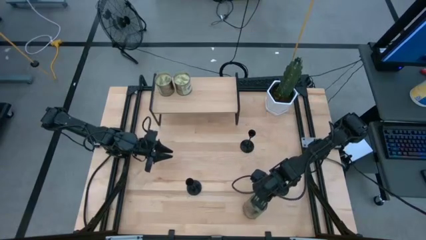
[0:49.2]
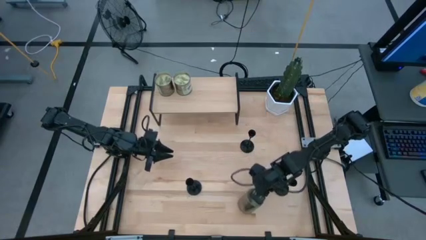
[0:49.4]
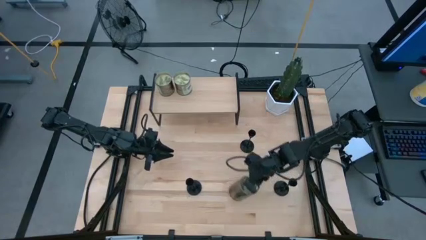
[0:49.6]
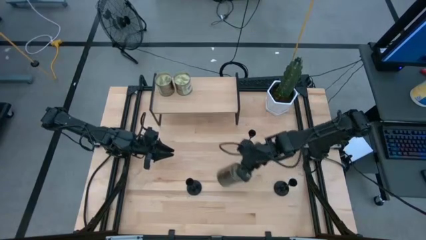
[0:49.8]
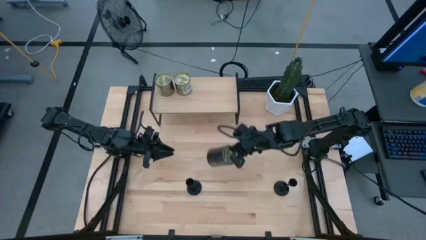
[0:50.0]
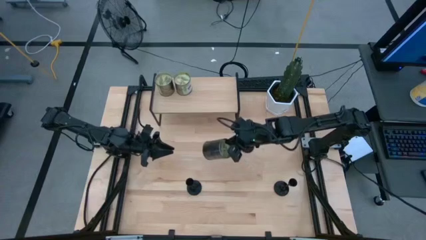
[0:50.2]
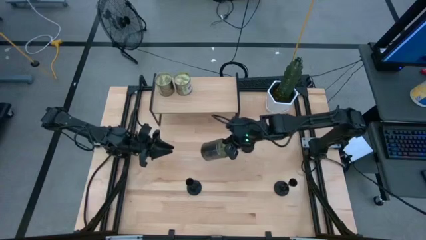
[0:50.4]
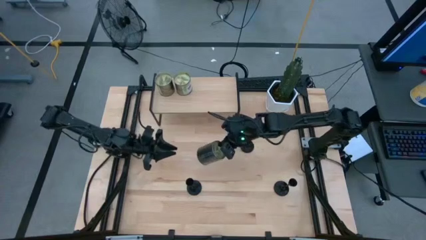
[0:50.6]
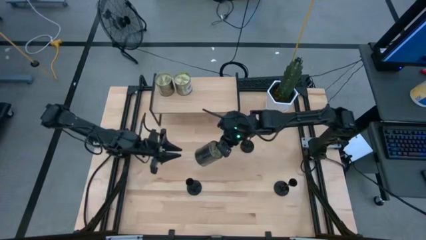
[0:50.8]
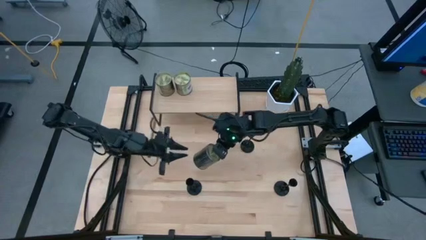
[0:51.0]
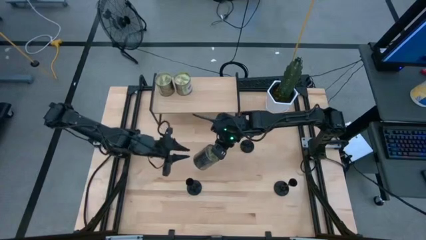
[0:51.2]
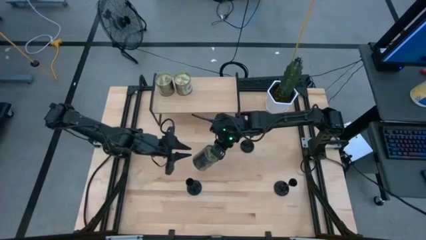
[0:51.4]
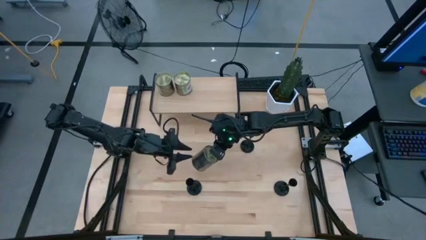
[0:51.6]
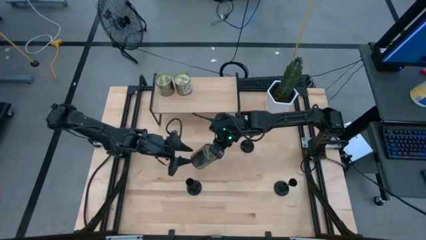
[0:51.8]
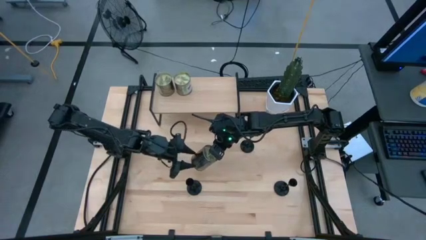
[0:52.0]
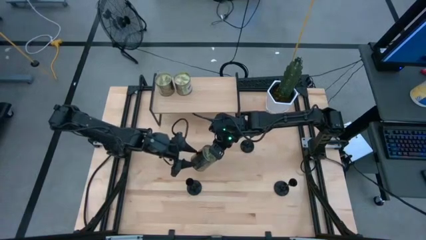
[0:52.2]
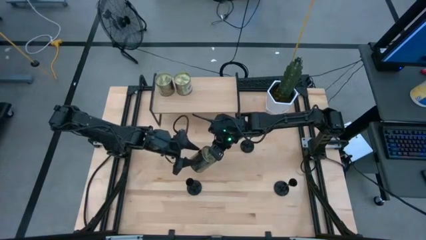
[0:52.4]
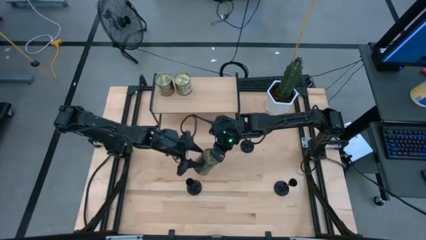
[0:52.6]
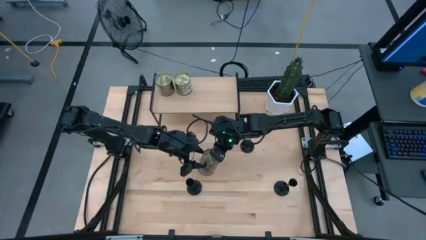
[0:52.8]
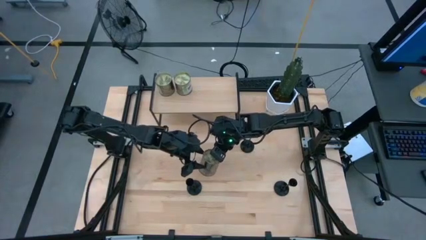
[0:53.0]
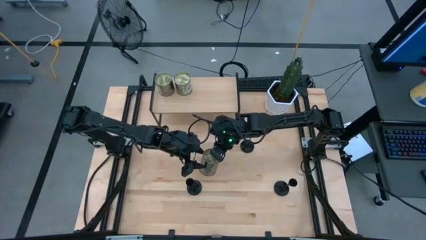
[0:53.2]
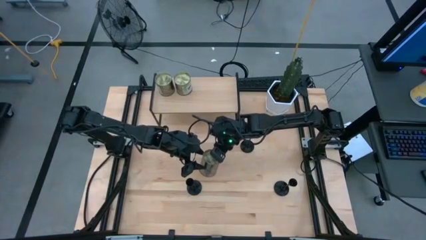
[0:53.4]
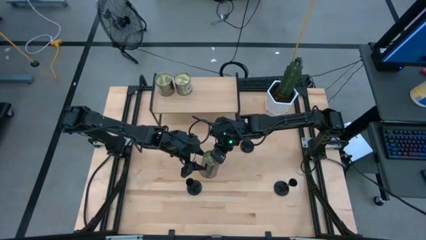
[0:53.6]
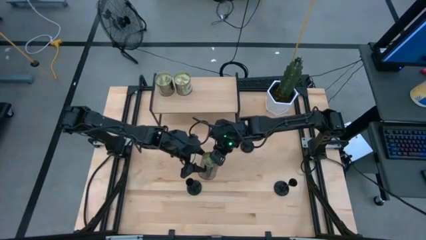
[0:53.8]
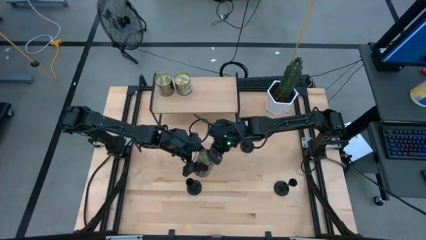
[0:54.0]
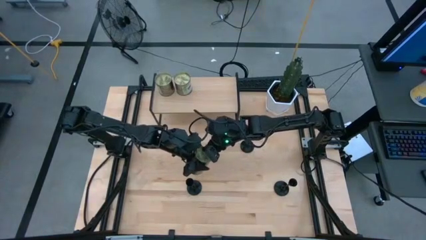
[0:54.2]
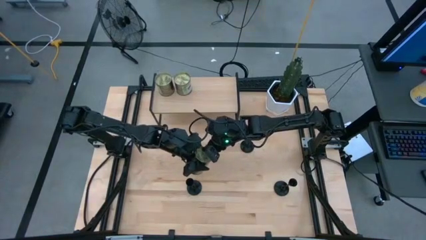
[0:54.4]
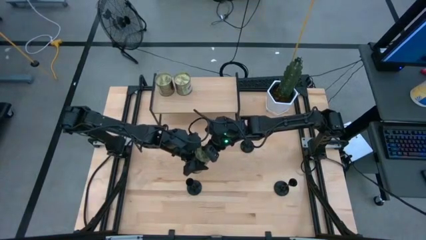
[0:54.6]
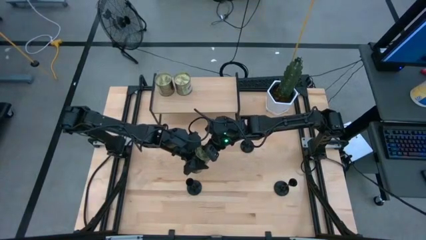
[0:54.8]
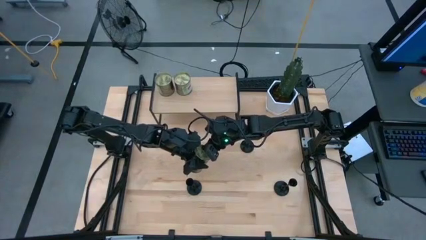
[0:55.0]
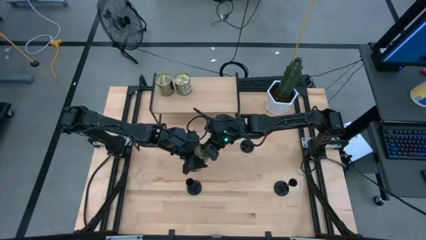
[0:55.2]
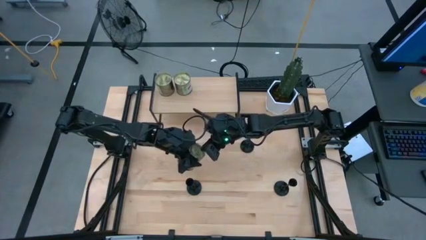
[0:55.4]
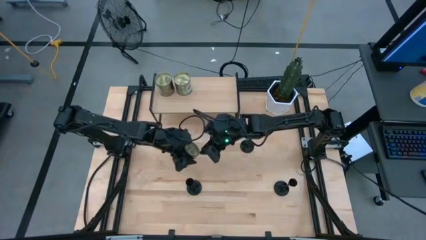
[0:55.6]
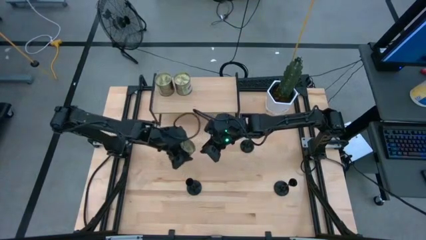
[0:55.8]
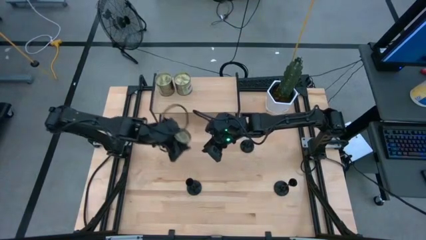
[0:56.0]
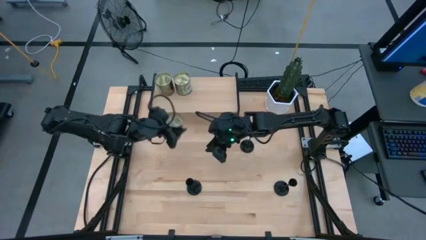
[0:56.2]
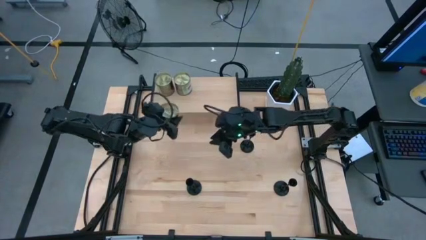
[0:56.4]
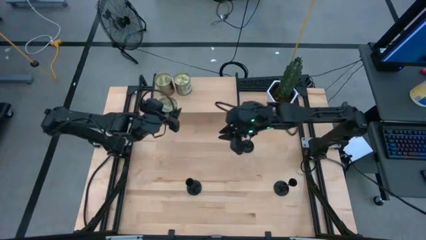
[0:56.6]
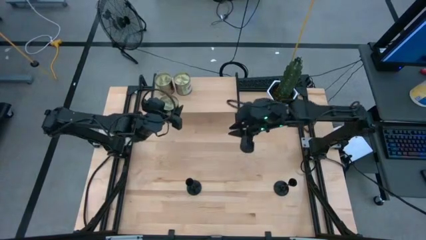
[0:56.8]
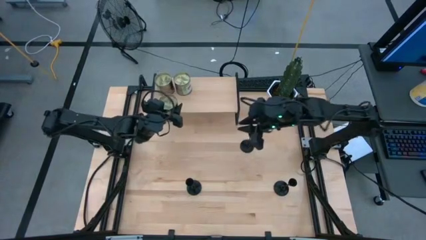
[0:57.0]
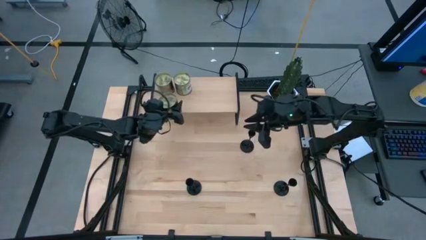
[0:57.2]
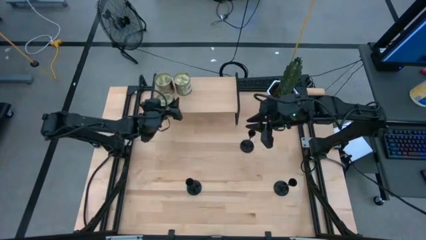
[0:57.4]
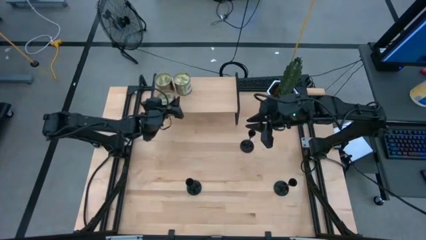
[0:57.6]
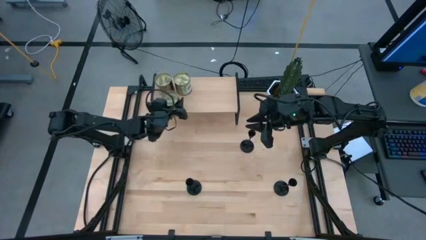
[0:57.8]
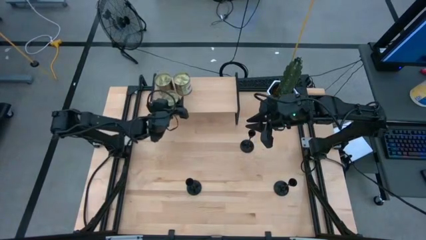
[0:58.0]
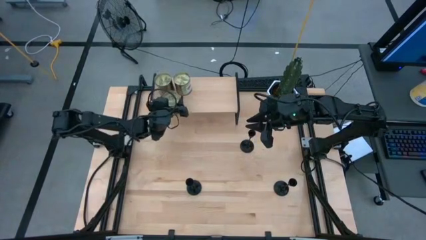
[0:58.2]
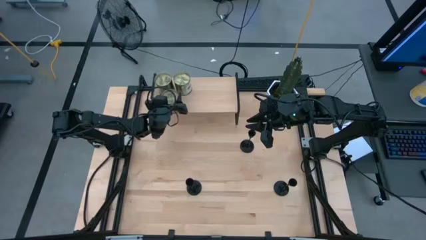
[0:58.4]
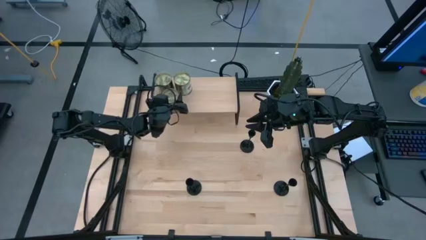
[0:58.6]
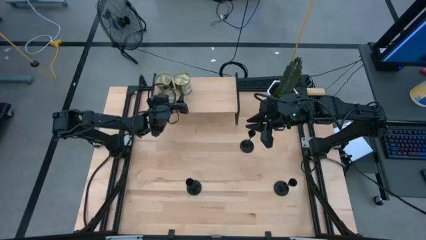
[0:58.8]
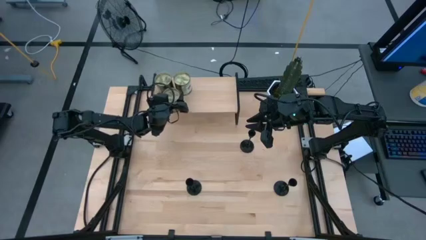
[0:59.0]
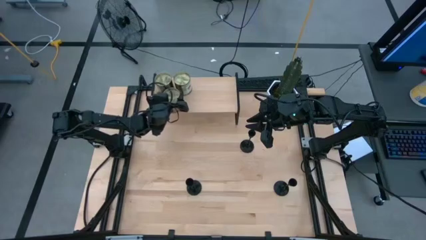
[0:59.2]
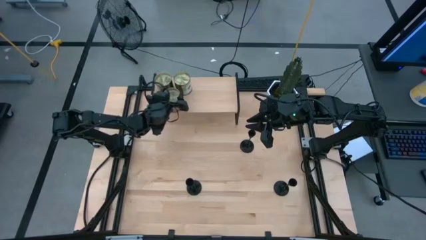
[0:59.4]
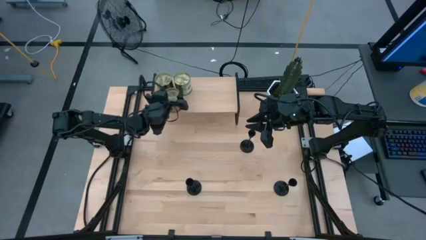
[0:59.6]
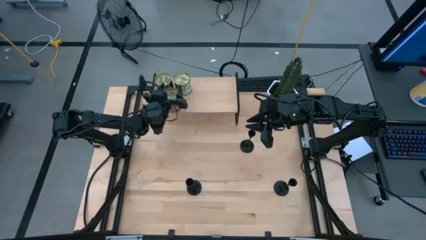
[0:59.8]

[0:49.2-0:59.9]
Task: Pick & Place candle stick holders
Put the green scented candle on the shelf

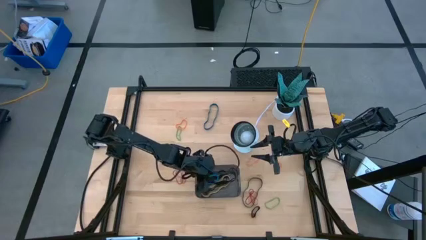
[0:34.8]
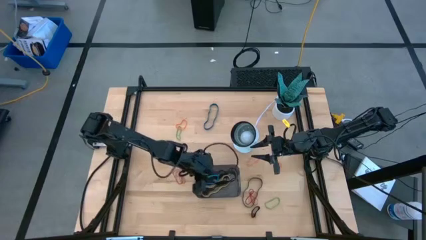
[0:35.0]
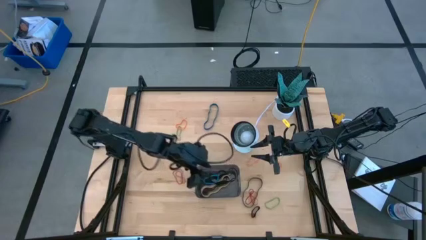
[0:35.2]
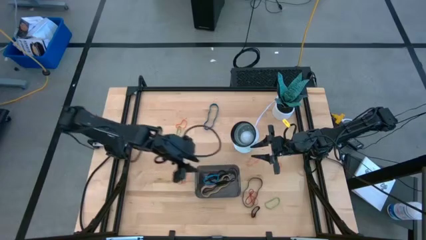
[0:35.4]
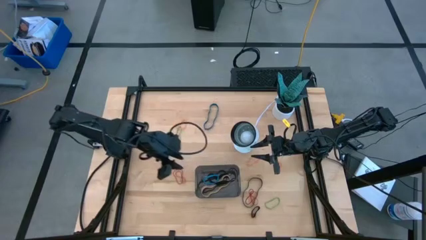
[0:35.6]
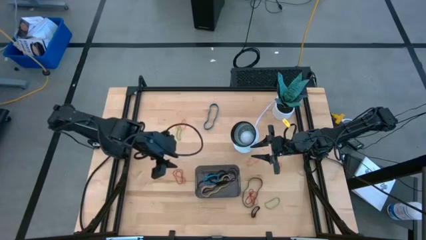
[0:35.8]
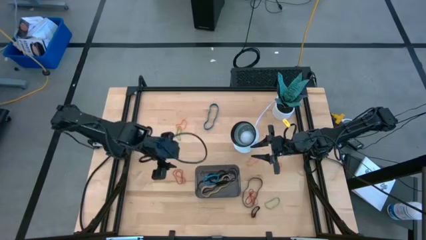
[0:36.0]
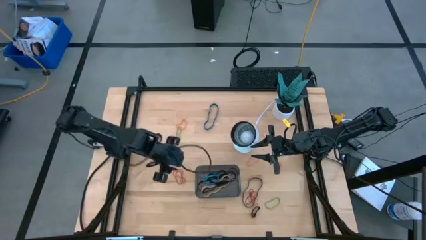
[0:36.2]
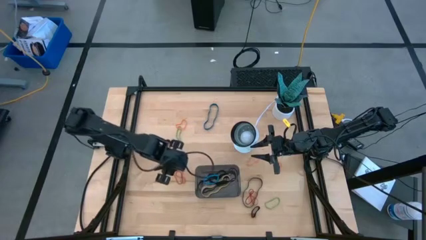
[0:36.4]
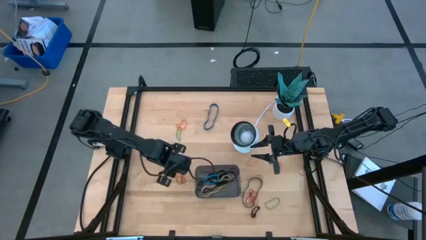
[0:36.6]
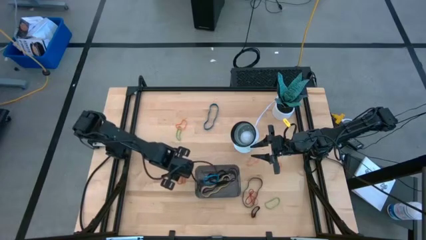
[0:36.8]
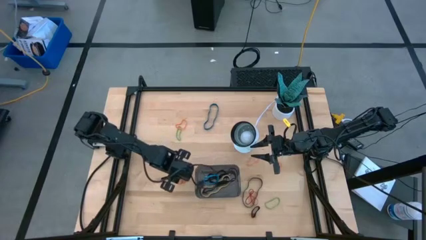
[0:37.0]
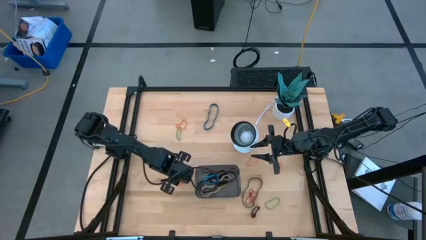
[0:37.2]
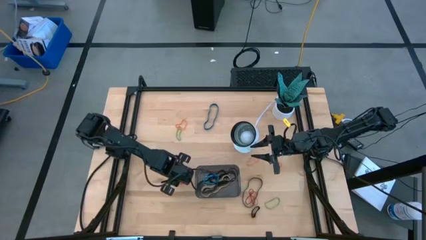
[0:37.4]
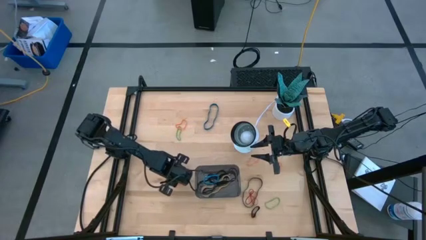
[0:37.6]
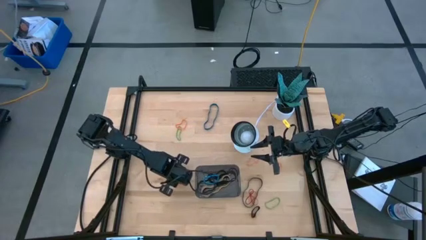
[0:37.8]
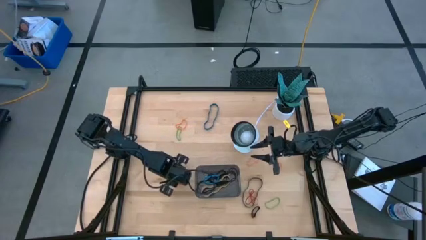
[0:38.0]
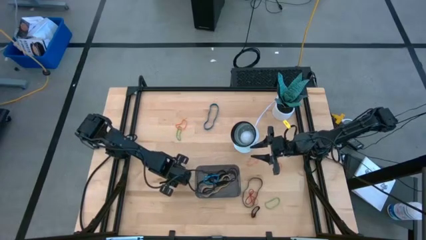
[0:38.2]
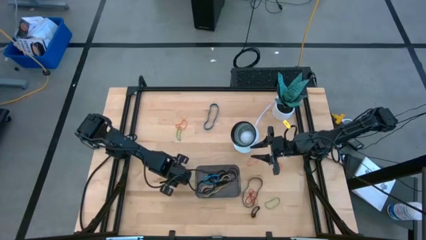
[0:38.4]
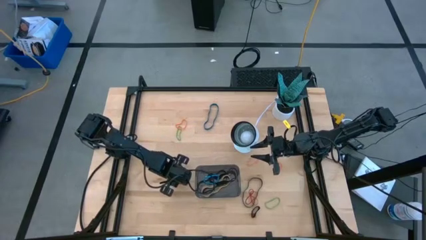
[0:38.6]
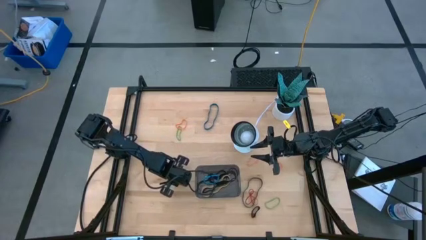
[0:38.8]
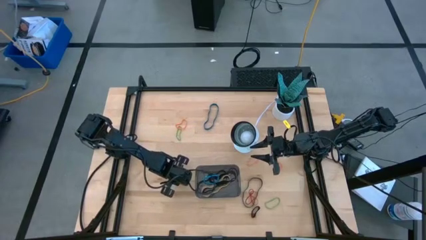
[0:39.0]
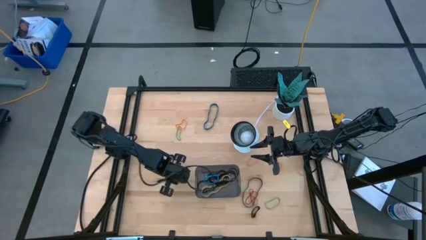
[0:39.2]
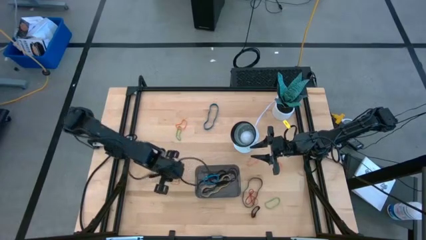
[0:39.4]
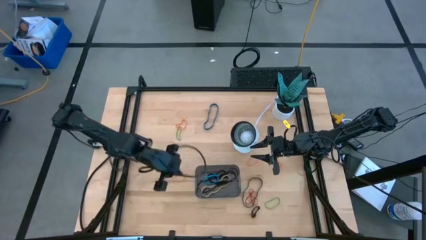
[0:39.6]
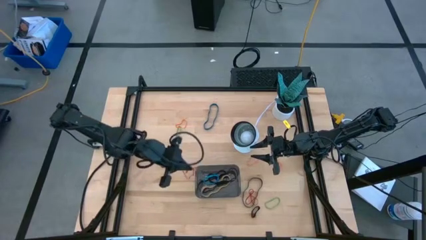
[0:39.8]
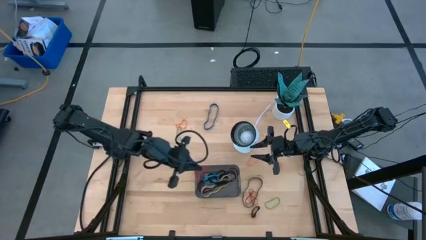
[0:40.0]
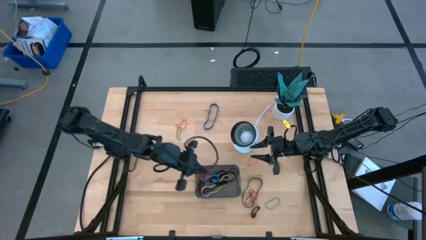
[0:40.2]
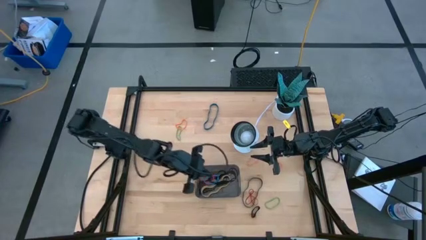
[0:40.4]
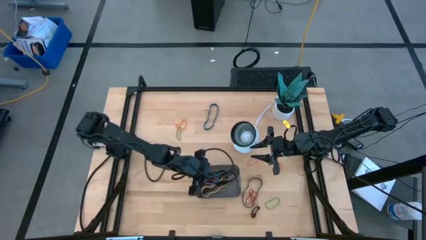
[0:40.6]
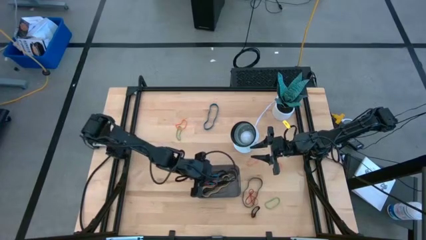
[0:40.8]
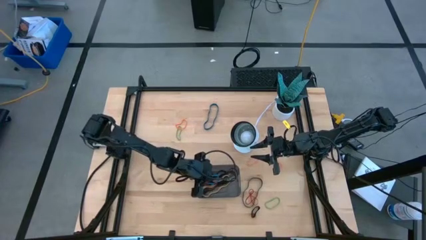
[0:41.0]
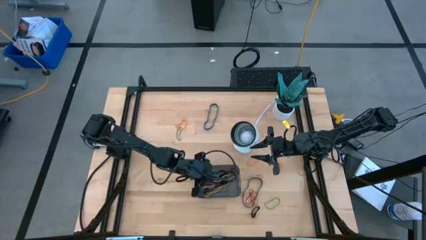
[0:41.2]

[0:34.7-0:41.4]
Task: Pick and place rubber bands into bin
Put the left red rubber band into the black bin
